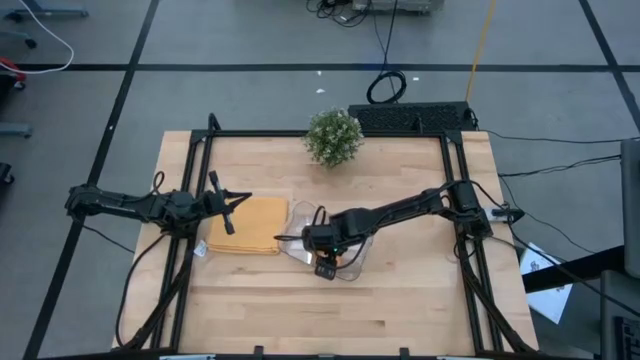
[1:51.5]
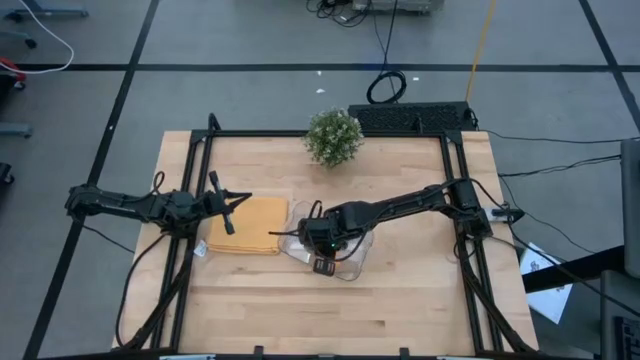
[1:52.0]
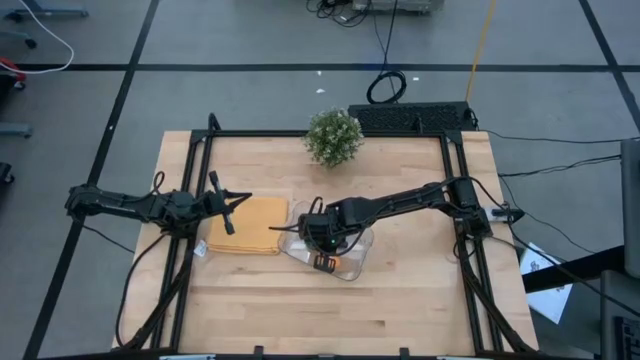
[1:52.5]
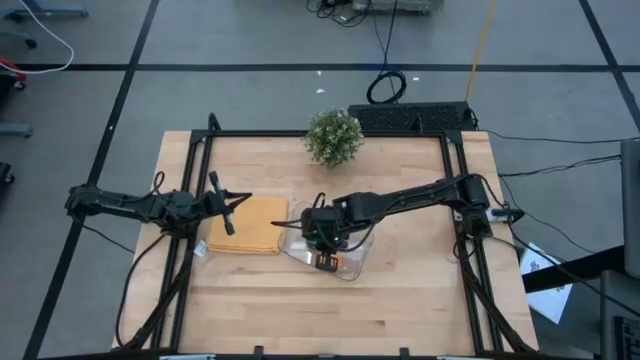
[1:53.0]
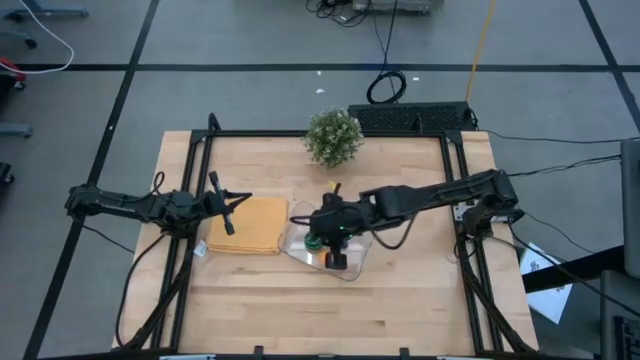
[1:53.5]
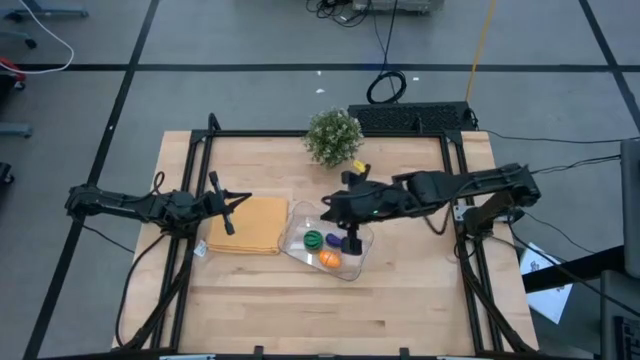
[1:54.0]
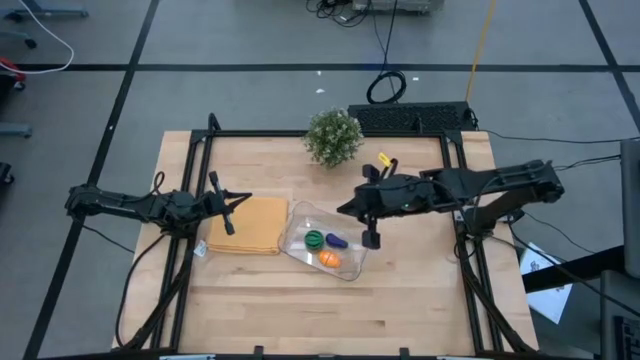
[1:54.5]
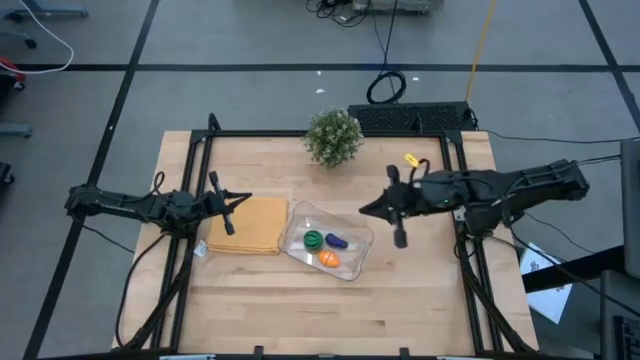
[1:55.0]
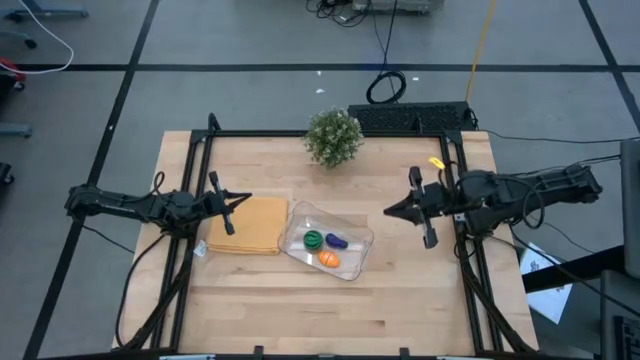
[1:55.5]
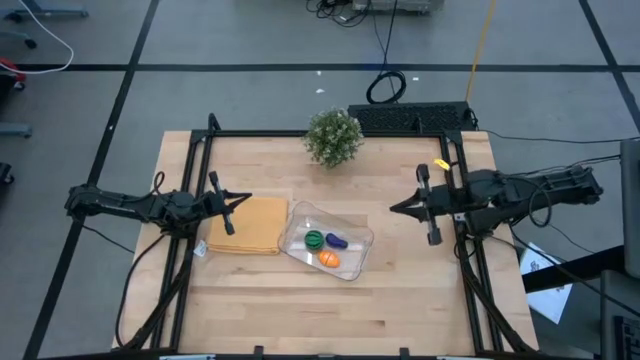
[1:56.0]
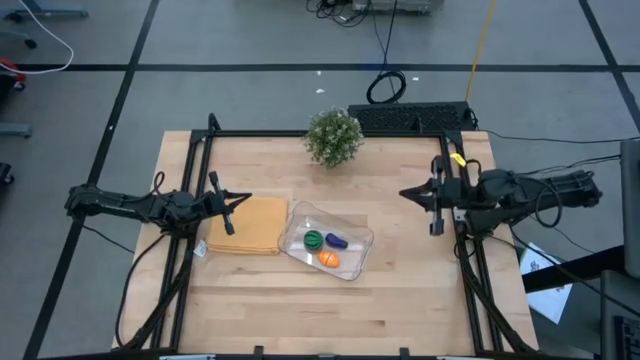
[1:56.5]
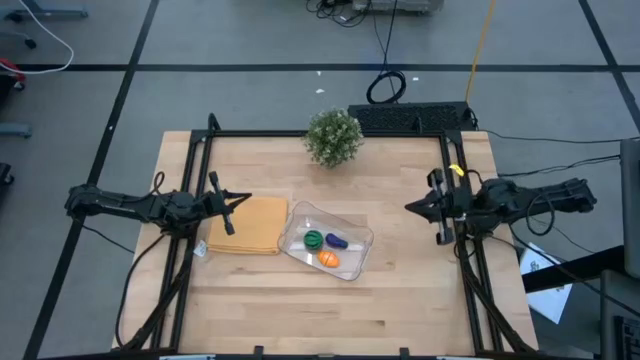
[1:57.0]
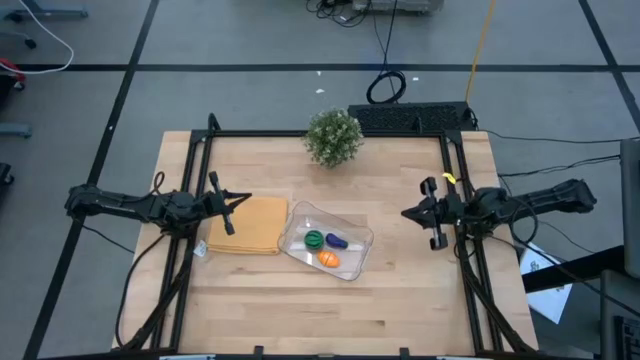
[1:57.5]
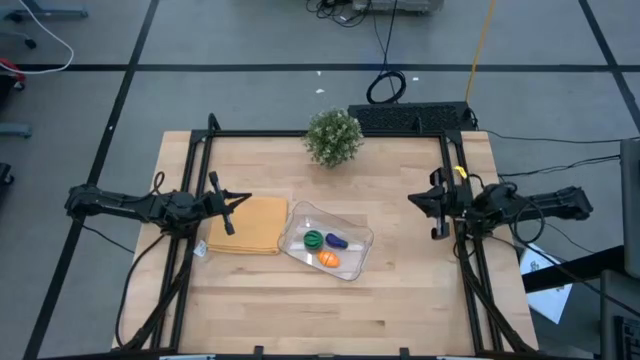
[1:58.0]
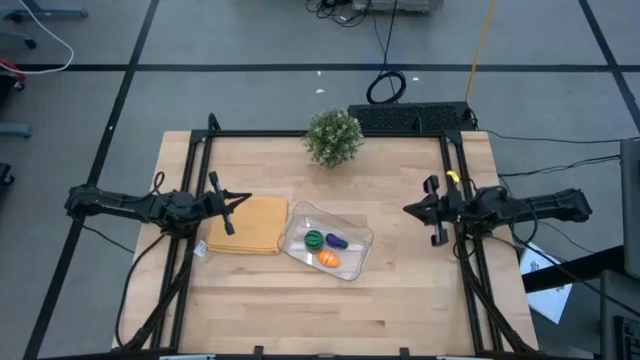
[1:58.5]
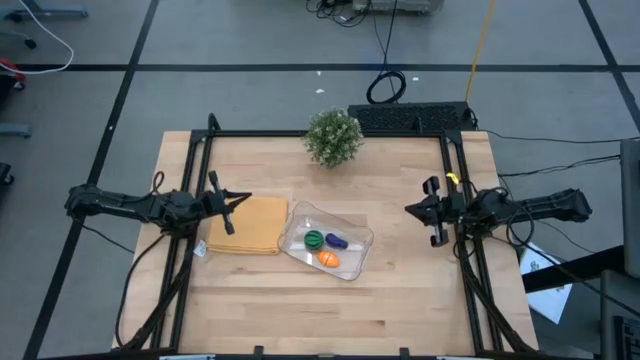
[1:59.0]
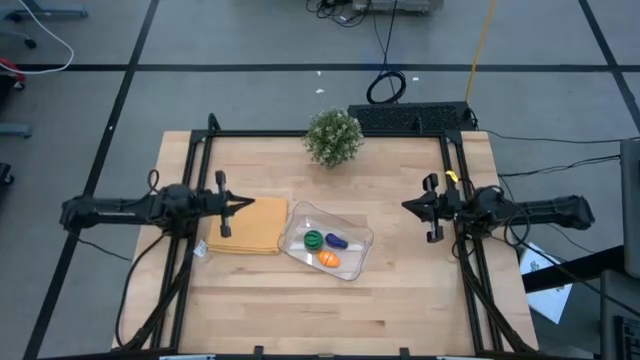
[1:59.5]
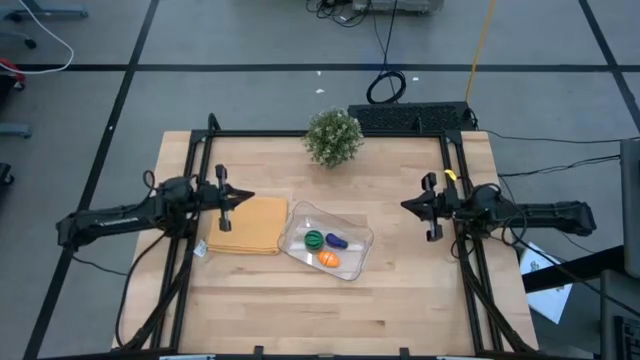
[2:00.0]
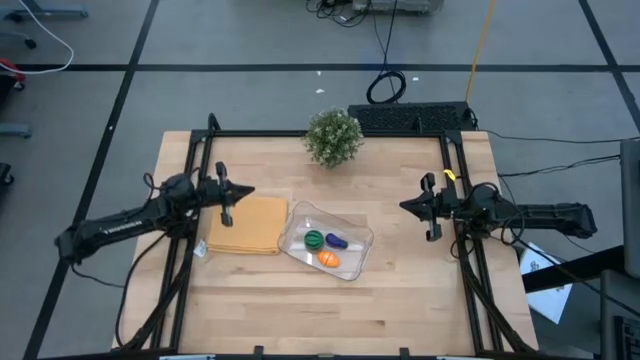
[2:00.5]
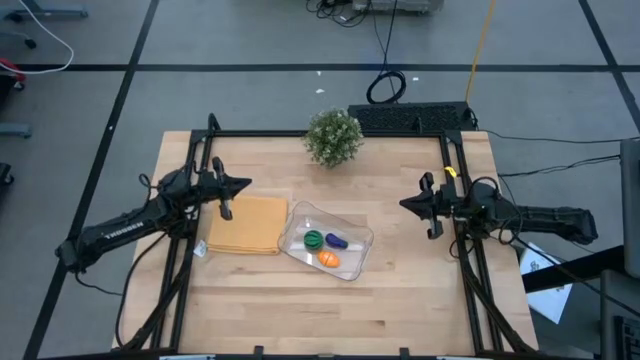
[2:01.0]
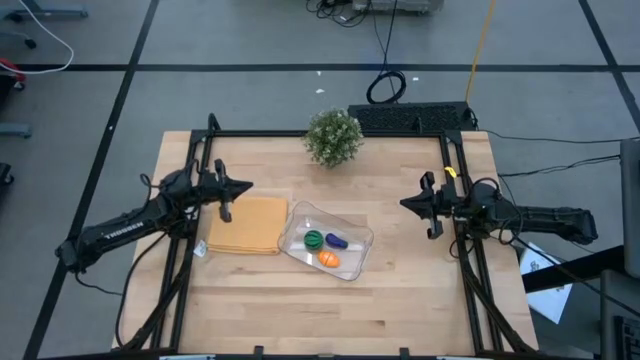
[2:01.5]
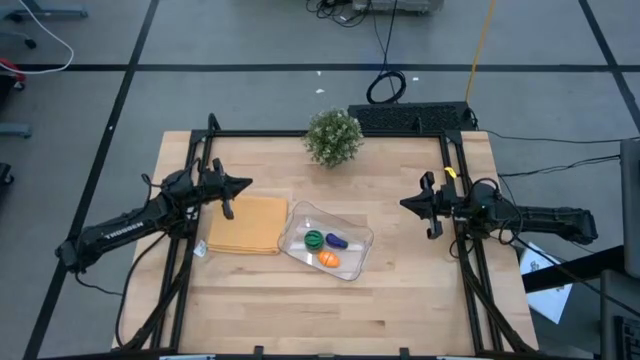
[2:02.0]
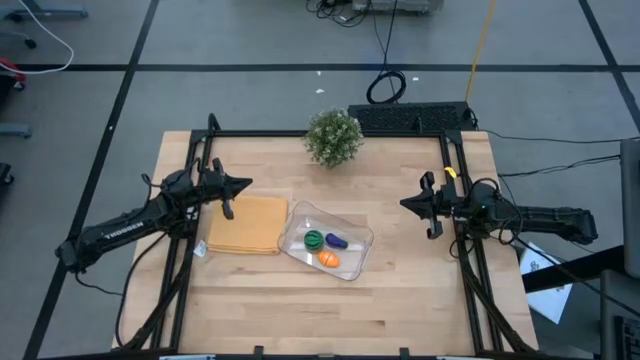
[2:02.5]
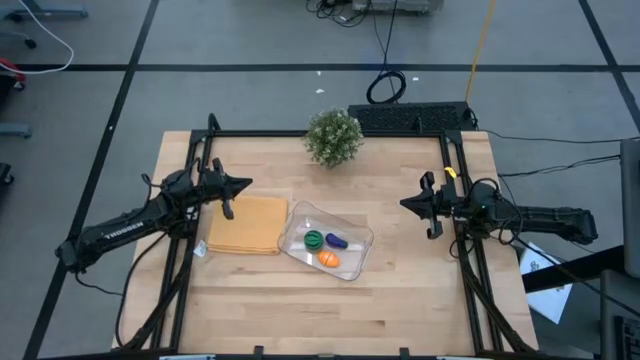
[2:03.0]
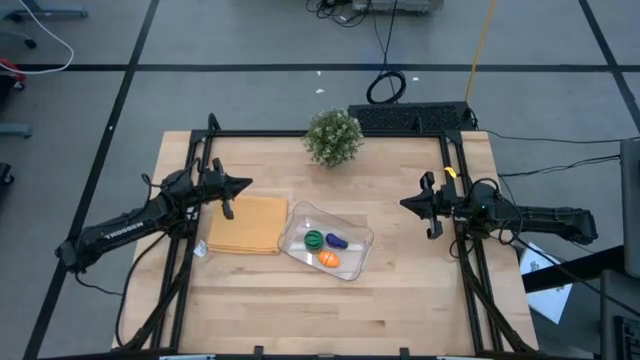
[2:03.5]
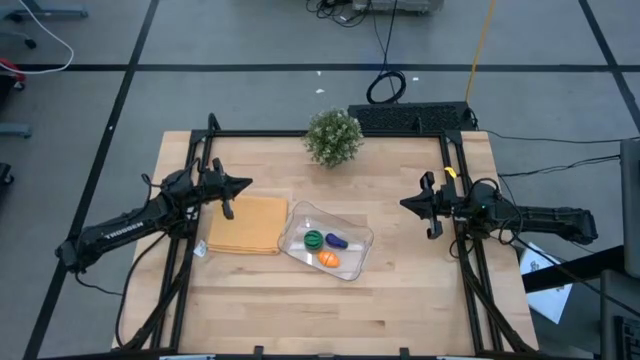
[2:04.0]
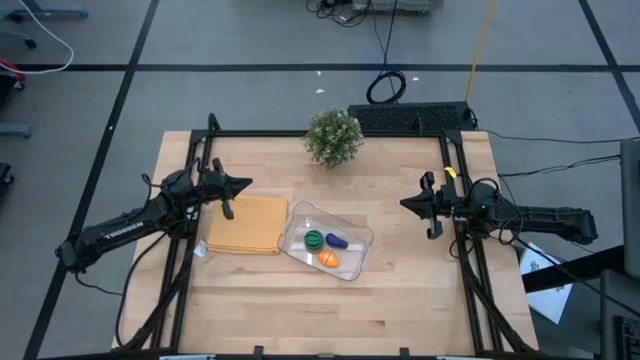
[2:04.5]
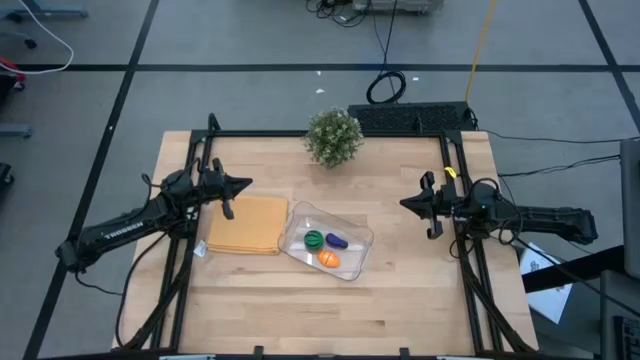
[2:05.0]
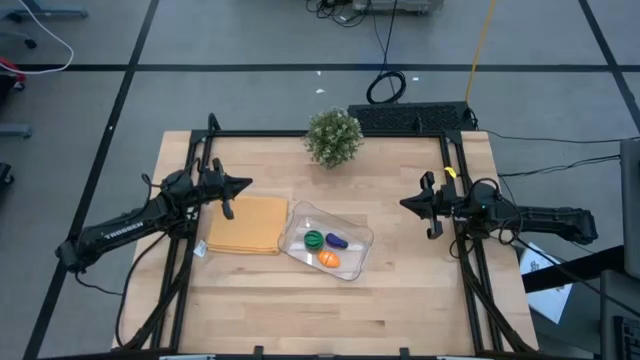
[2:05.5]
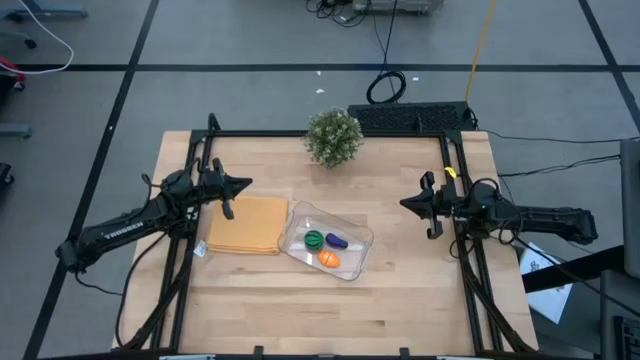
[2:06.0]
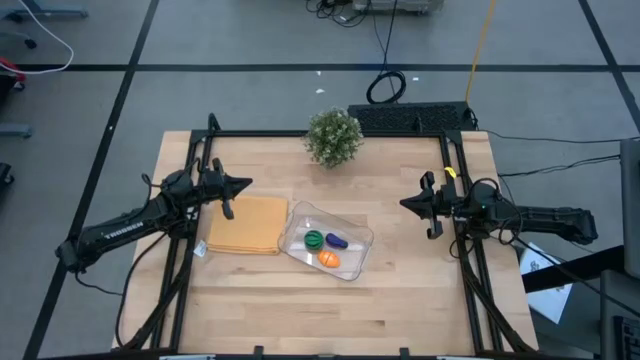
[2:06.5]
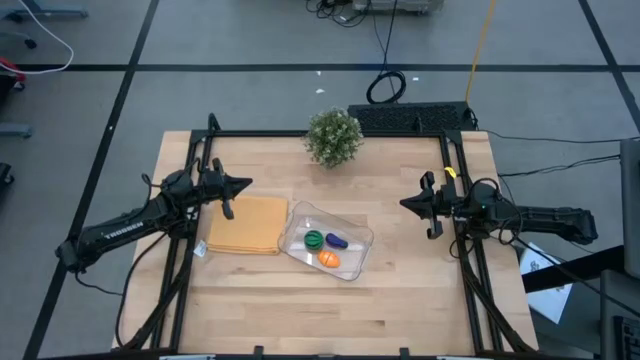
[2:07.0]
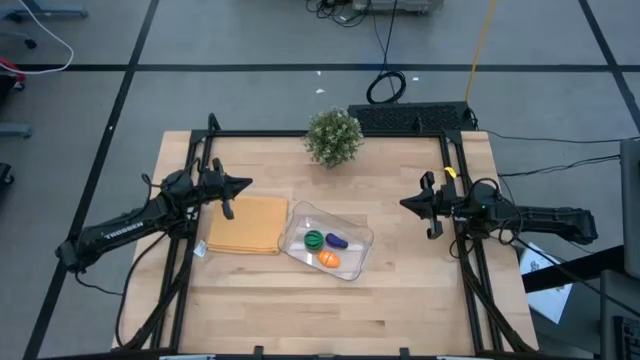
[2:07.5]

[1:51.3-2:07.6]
Task: Pick and placing Produce into tupperware
Return to Home Position

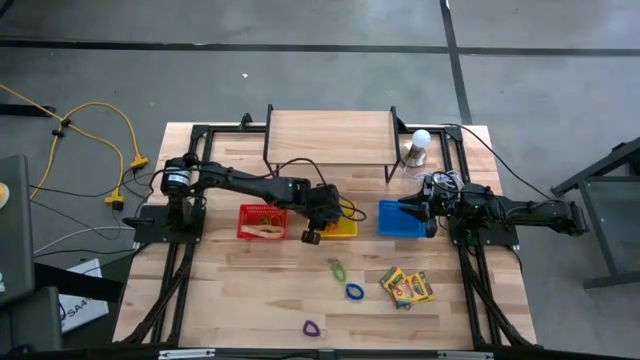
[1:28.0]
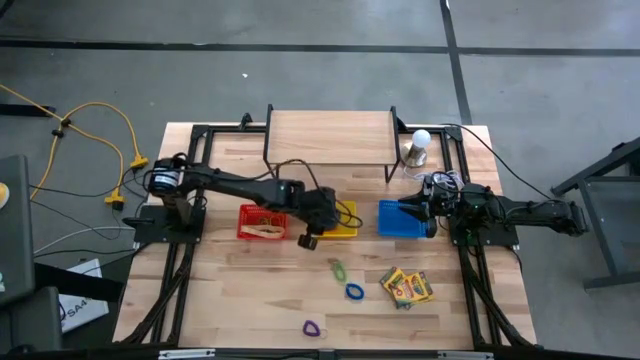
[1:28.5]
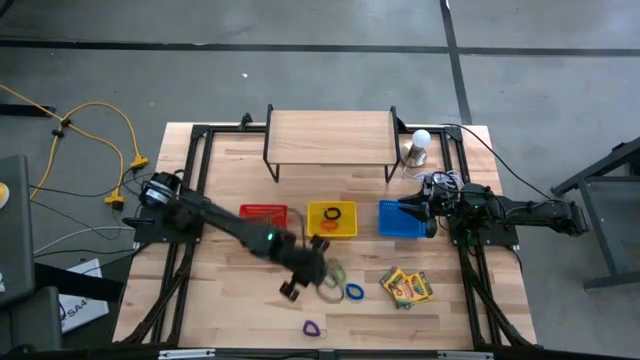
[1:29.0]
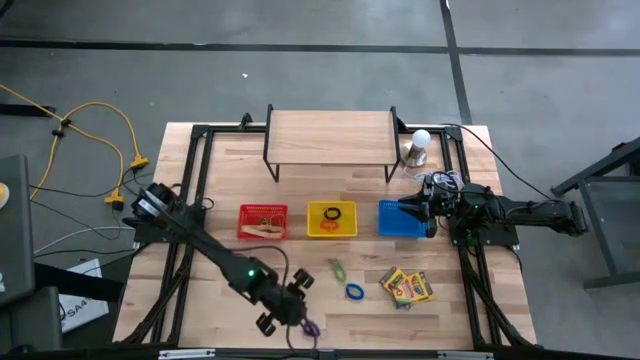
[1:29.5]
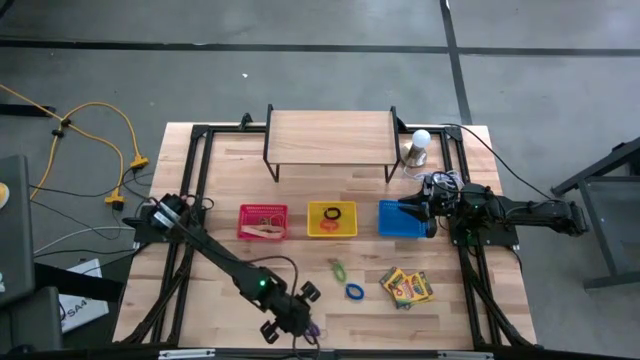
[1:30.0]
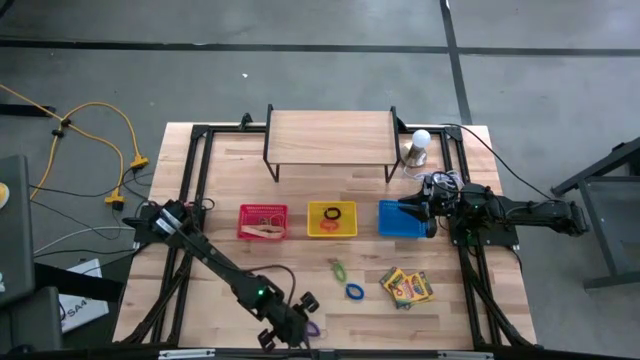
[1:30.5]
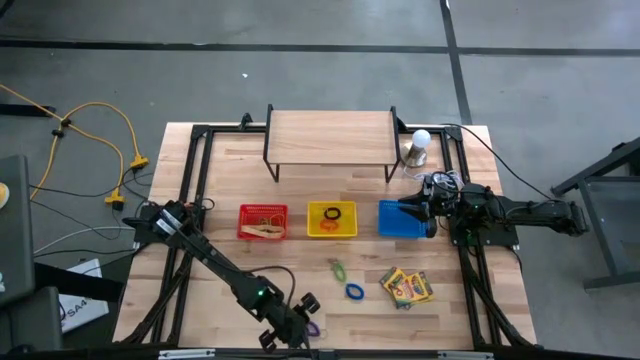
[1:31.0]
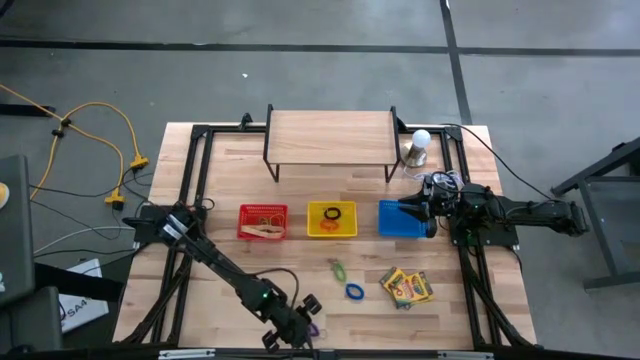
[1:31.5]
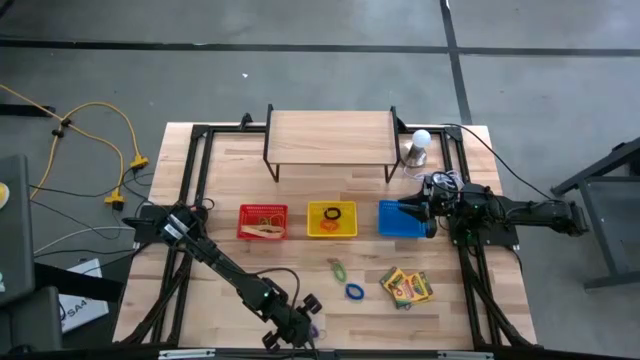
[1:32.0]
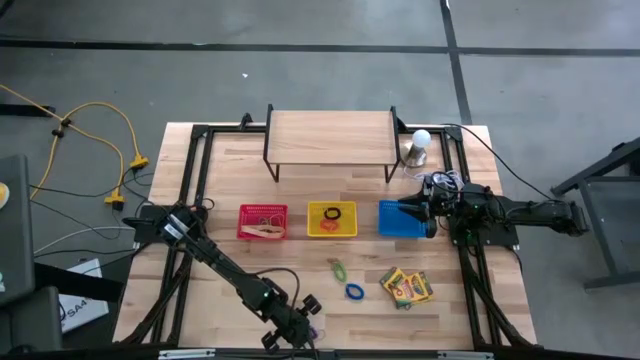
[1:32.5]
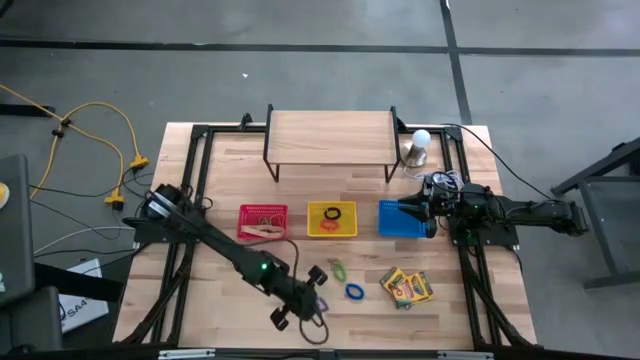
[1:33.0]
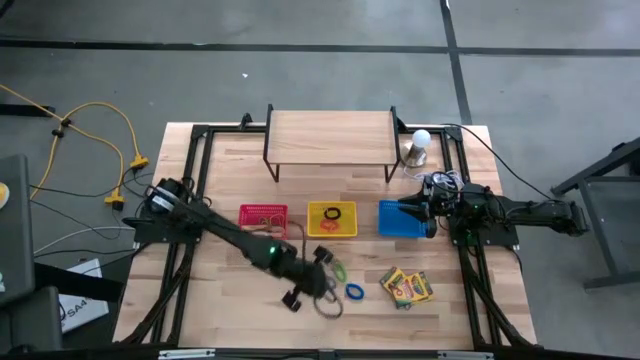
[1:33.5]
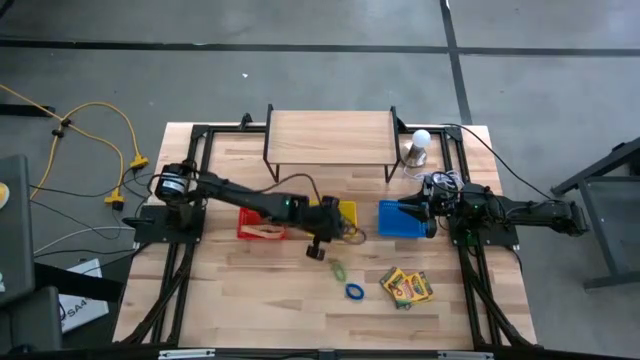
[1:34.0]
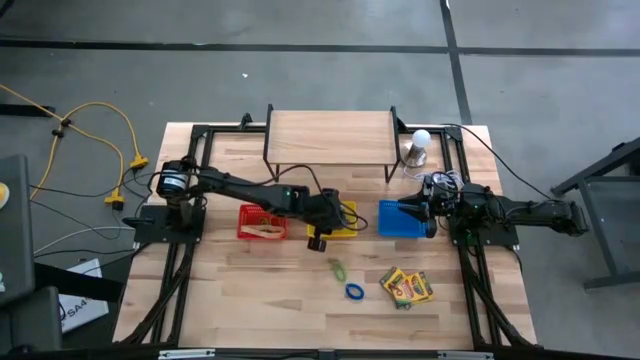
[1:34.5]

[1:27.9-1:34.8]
Task: Pick & Place Office Desk Supplies
Put the violet spring keychain into the yellow bin
